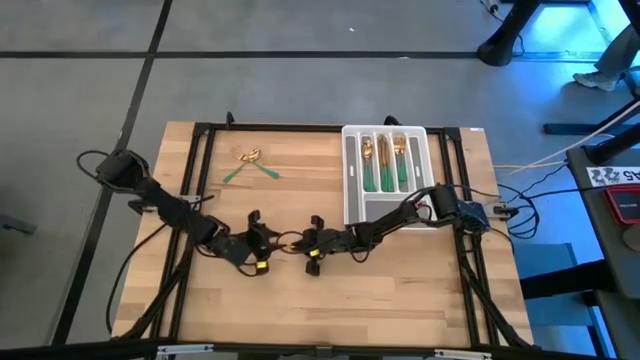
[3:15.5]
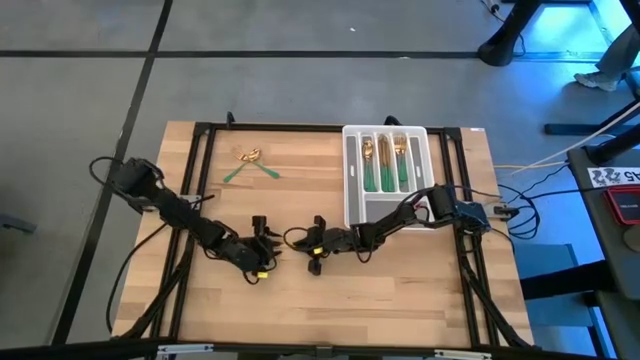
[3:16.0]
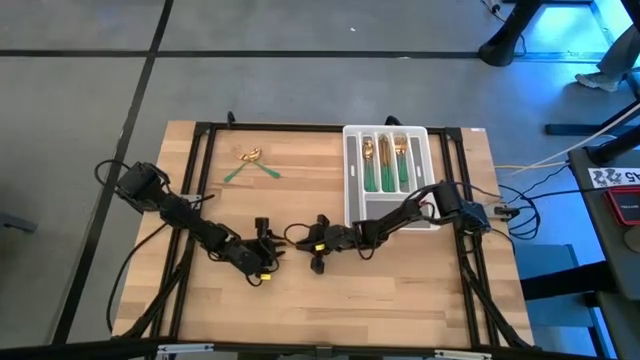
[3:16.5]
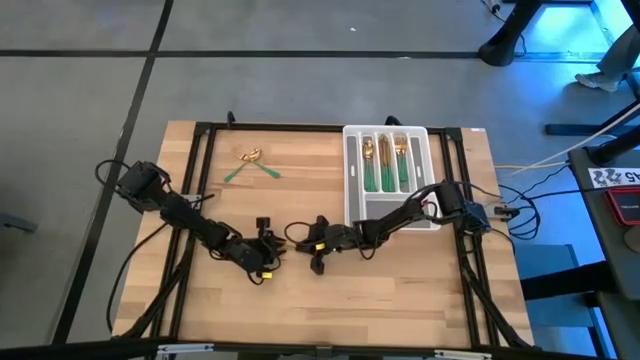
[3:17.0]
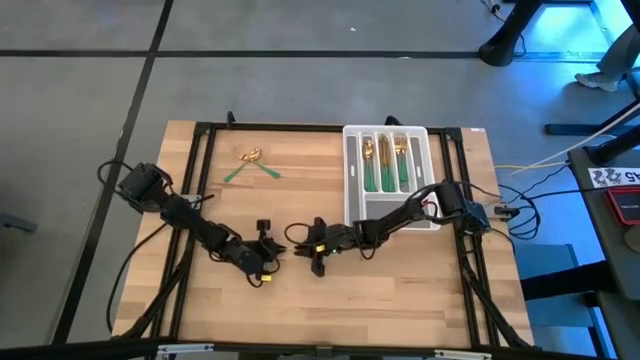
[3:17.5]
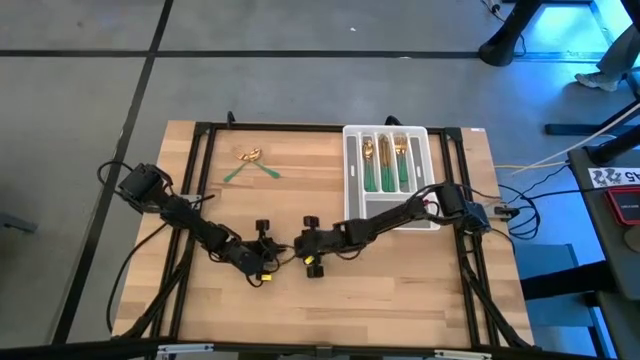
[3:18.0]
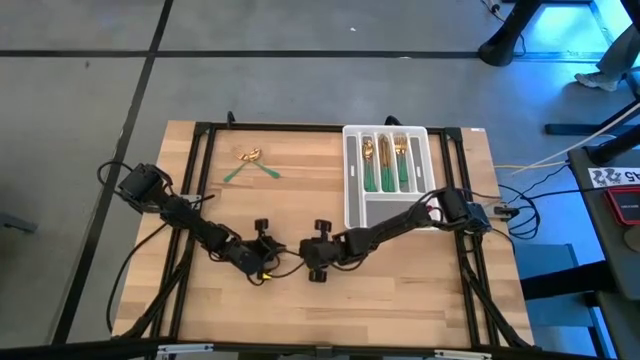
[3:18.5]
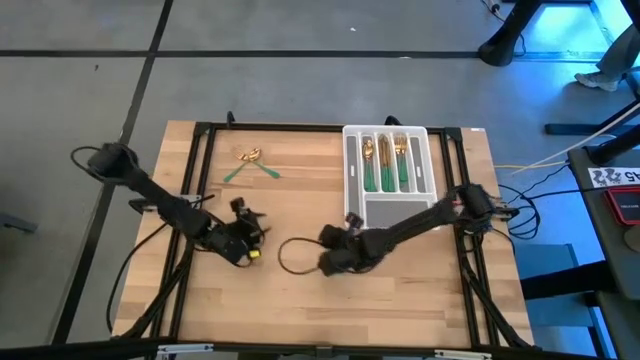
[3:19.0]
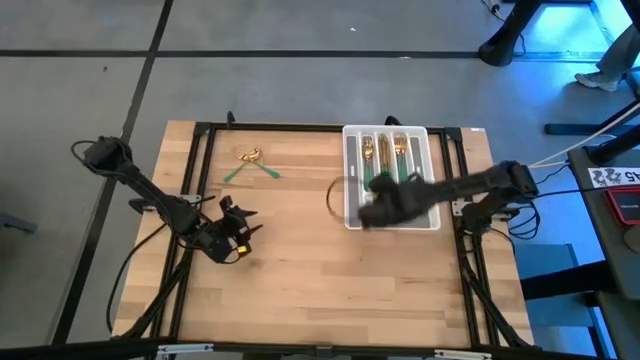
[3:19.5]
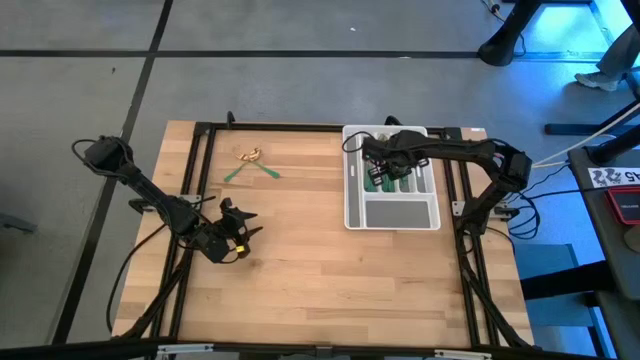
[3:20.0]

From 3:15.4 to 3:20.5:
Task: Sort silverware
Put the green knife into the silverware tray

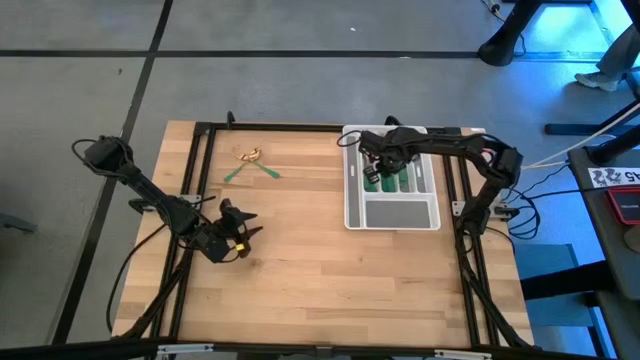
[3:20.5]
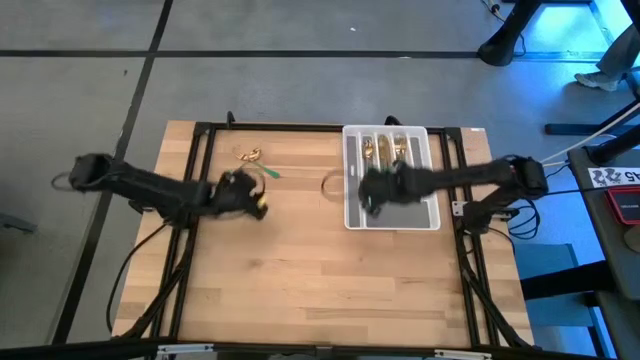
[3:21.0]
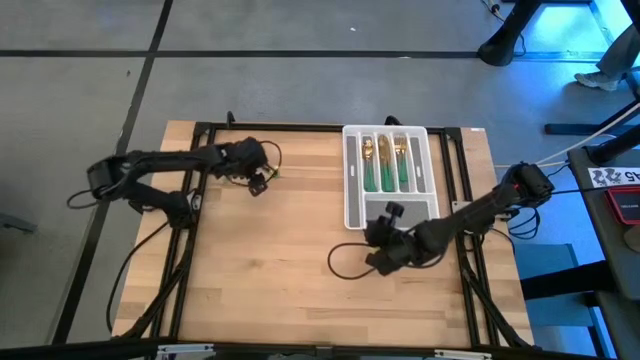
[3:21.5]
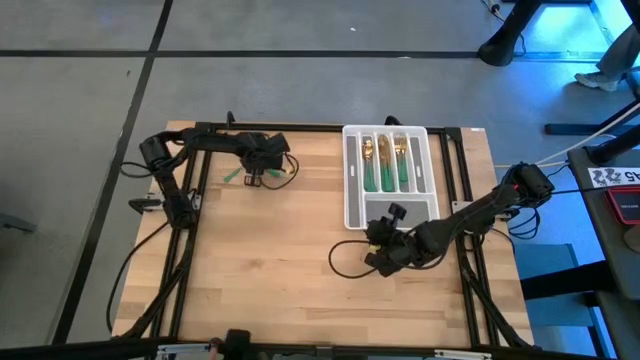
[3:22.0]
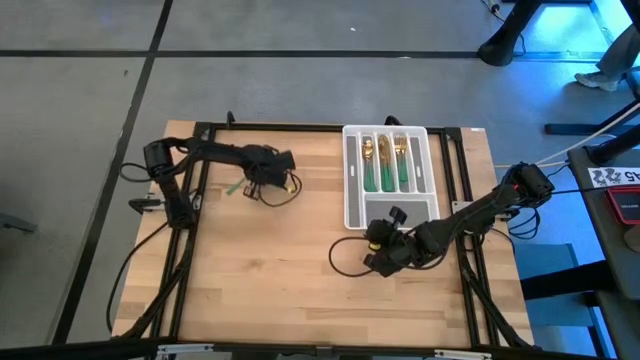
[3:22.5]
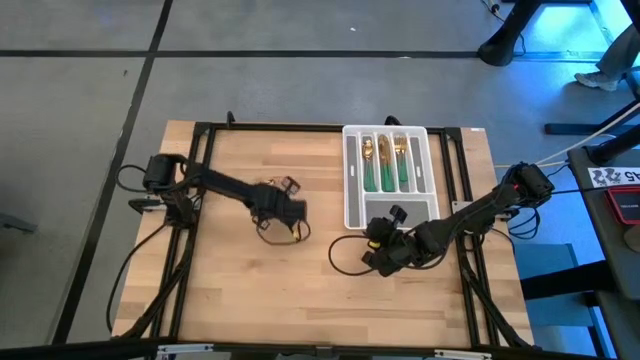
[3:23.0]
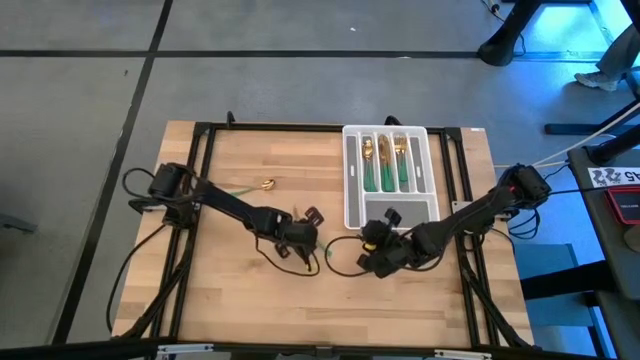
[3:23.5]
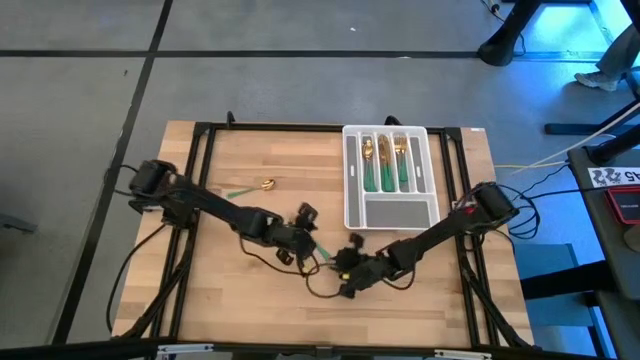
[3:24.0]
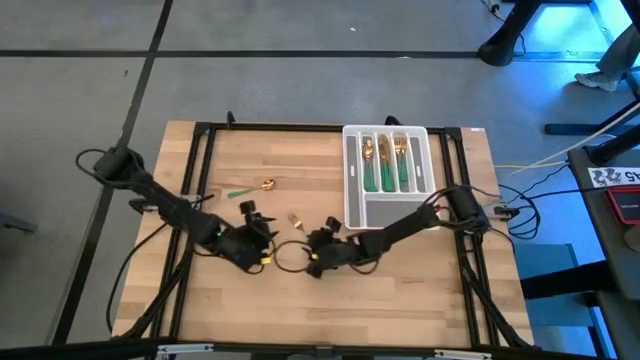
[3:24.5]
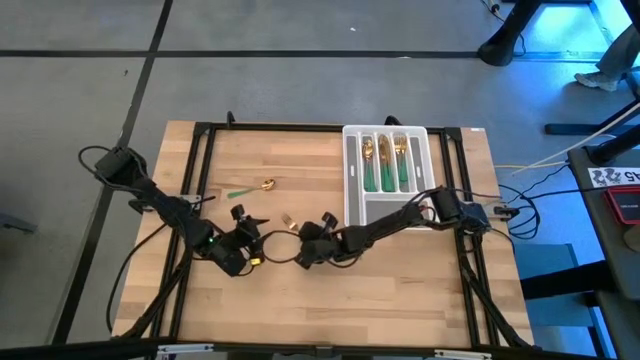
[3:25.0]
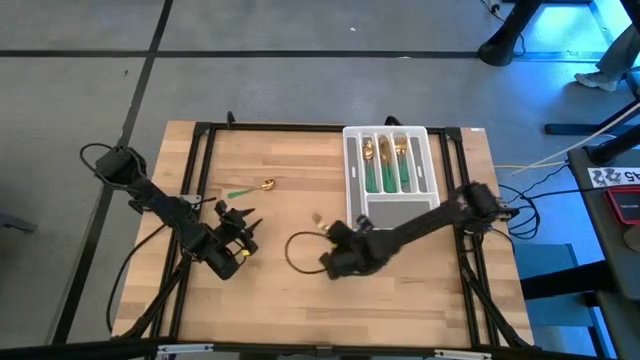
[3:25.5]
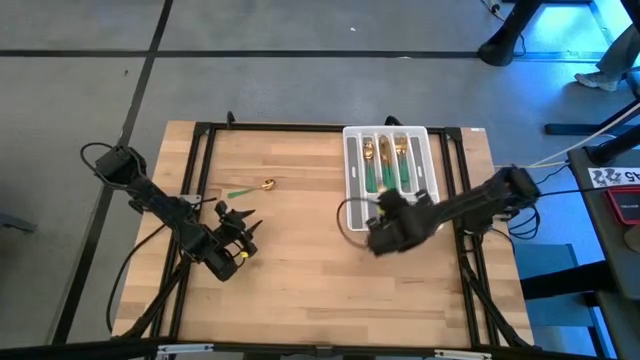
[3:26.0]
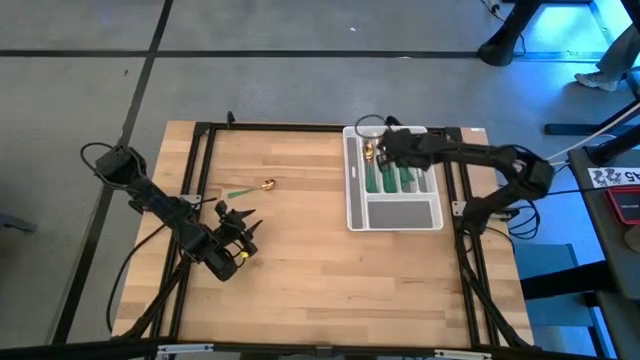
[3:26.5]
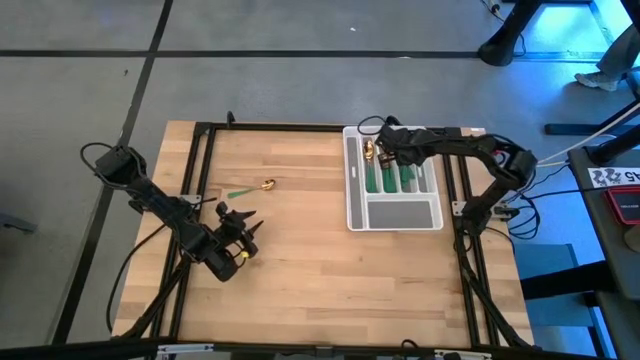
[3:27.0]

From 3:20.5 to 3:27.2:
Put the green fork into the silverware tray

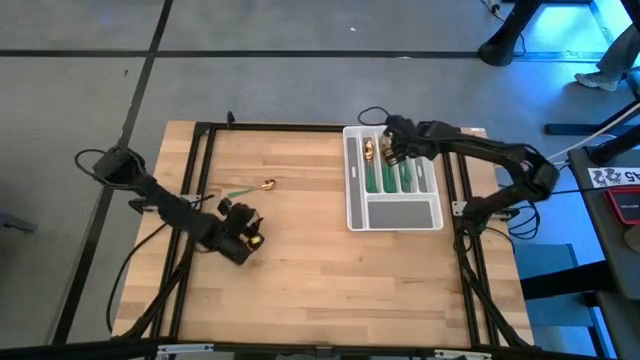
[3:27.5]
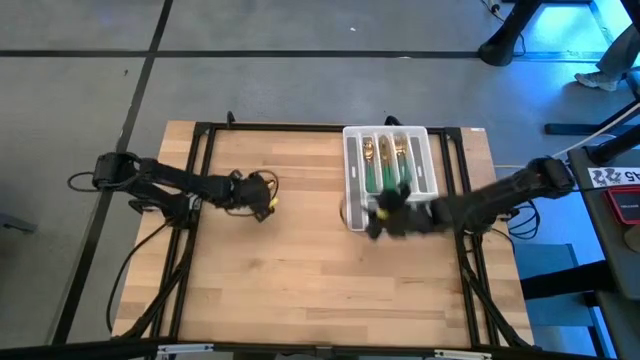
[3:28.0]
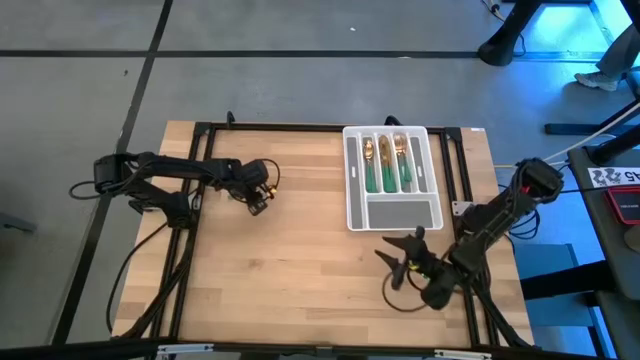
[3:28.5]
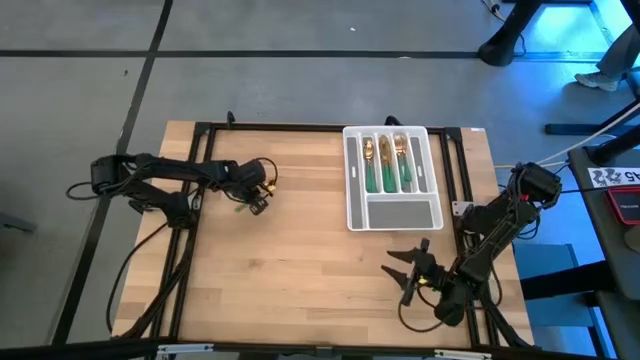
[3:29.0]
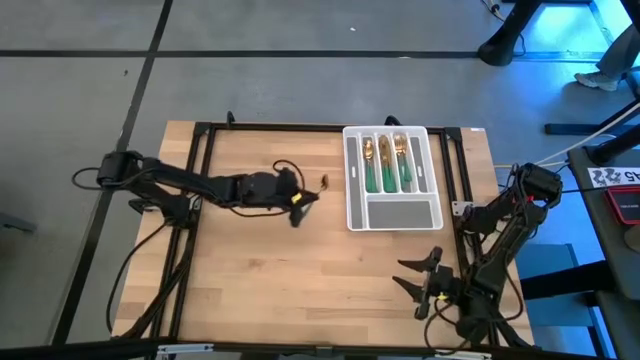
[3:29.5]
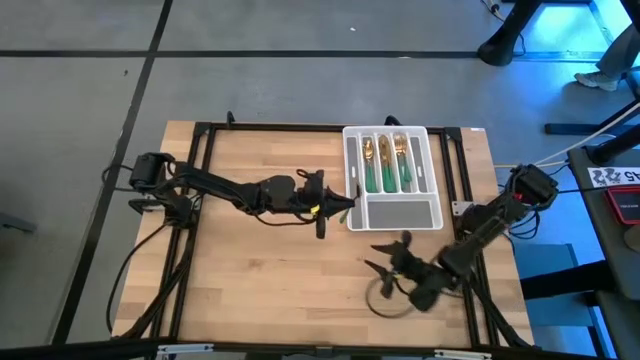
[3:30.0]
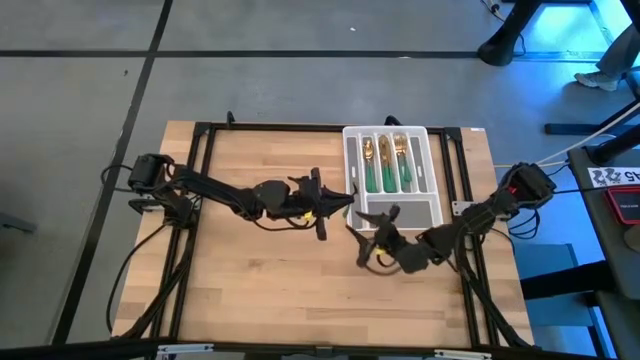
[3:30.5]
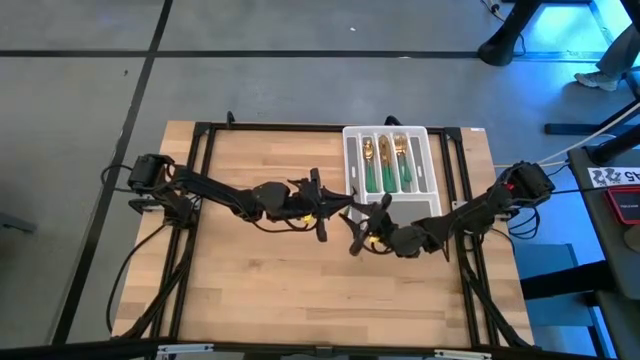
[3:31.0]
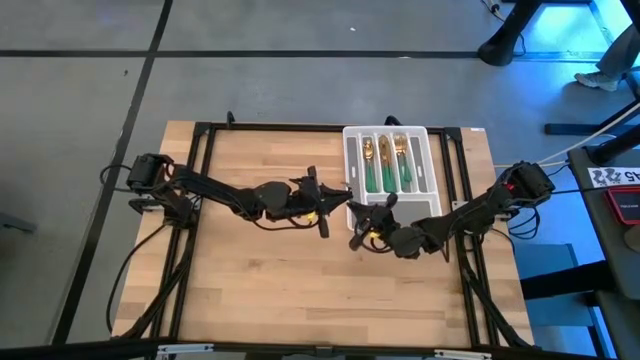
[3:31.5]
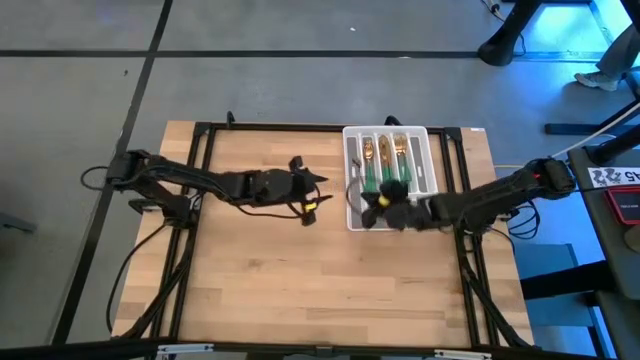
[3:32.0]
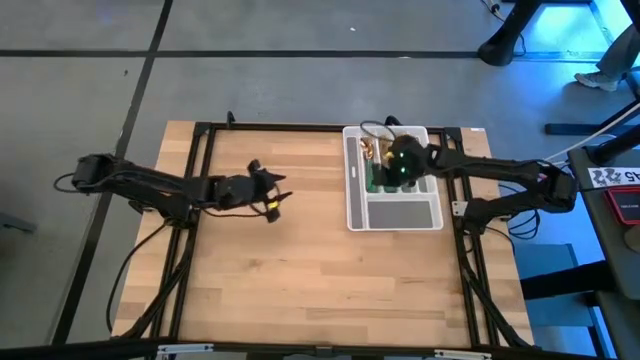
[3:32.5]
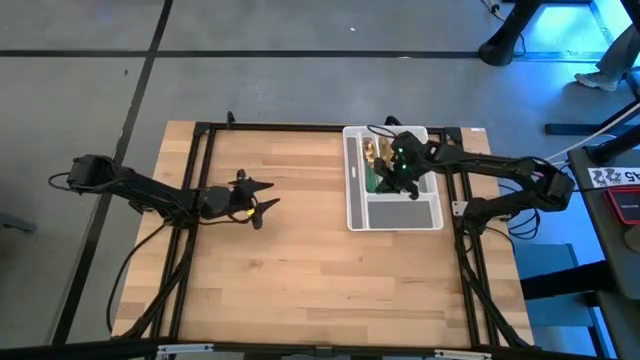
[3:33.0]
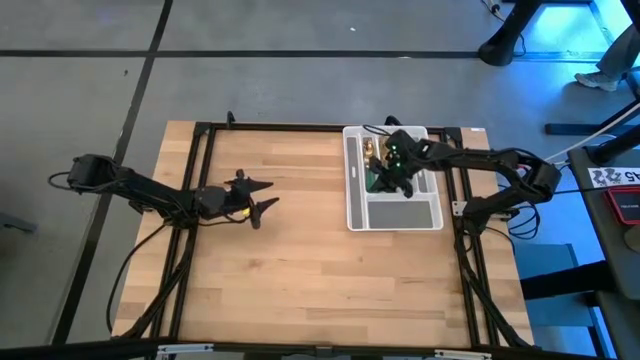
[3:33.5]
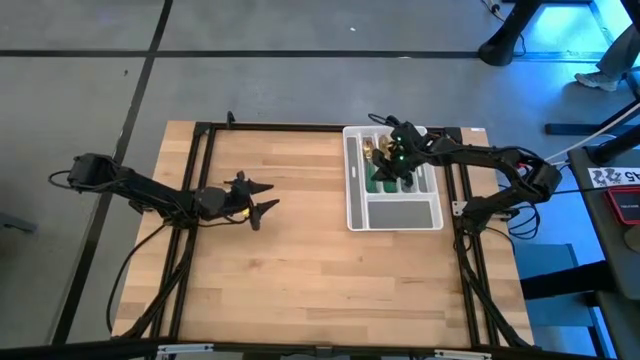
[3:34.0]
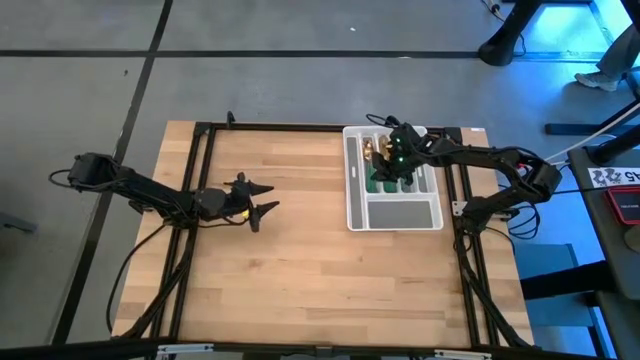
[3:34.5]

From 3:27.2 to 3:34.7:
Put the green spoon into the silverware tray

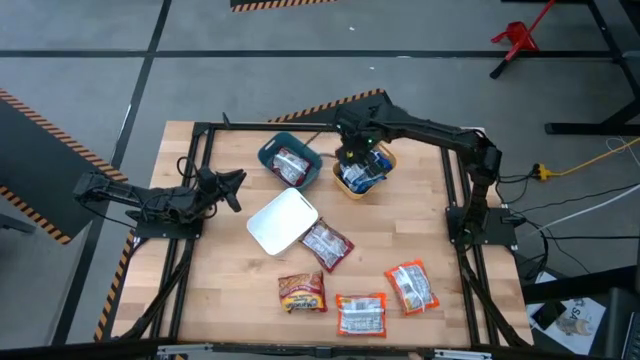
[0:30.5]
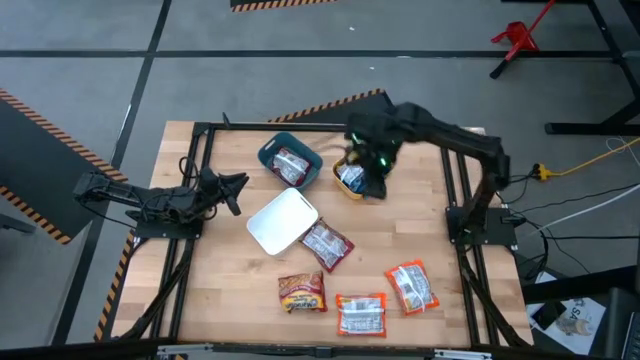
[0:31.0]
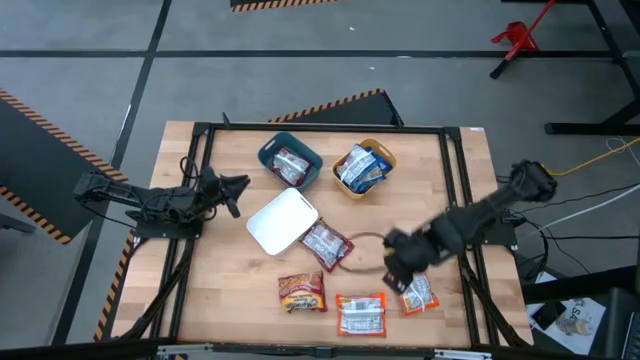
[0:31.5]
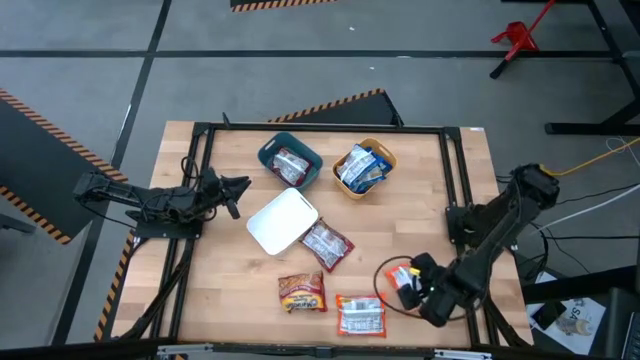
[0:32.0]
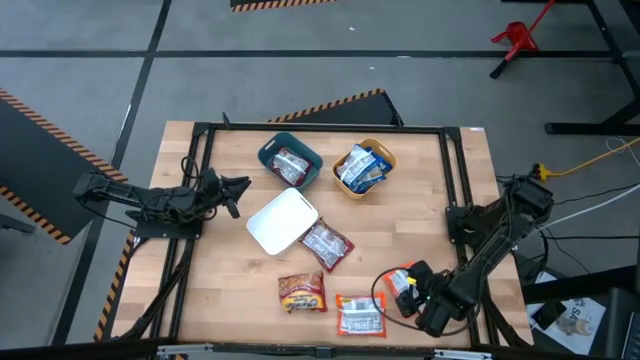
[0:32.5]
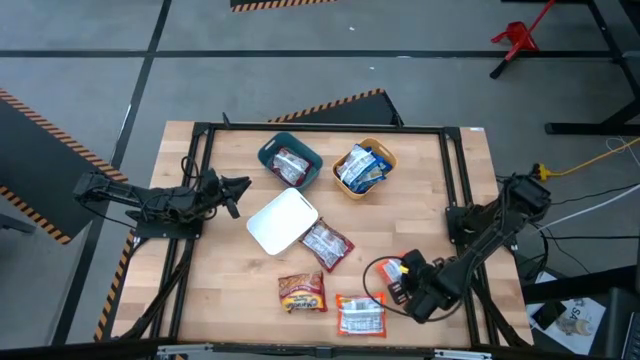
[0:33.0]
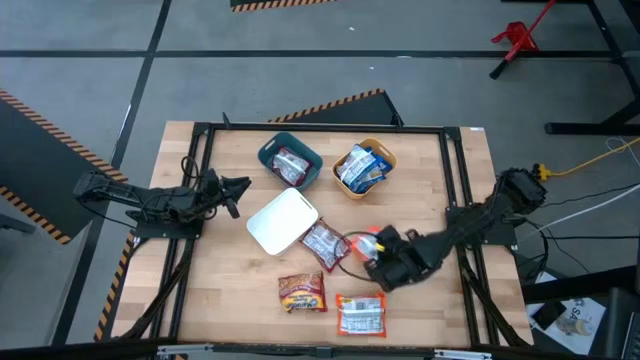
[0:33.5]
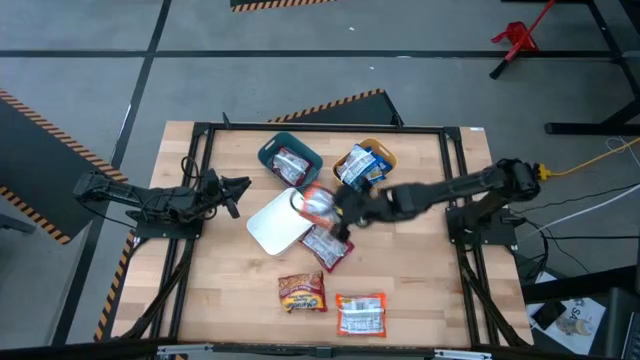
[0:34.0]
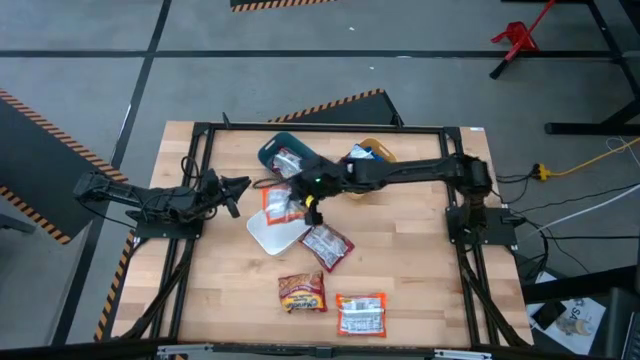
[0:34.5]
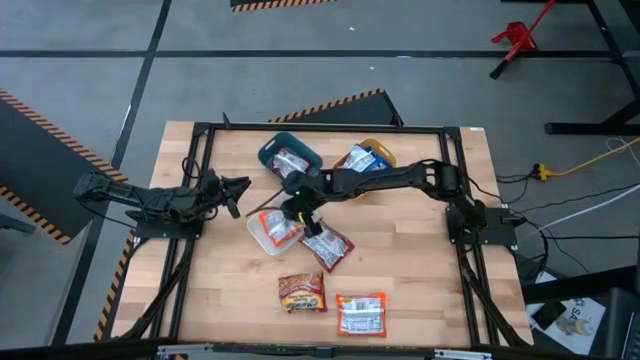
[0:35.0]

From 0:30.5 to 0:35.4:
Task: Sort Maruchan noodles
Put the right orange noodle pack into the white bin
